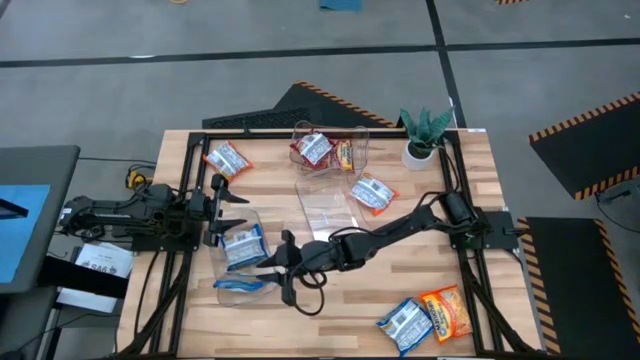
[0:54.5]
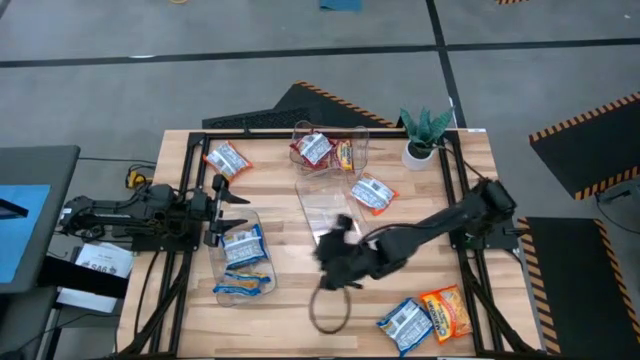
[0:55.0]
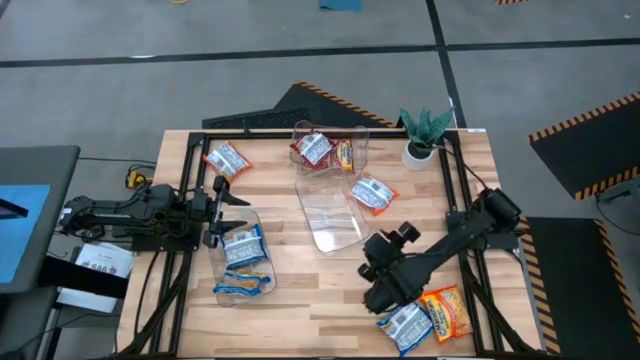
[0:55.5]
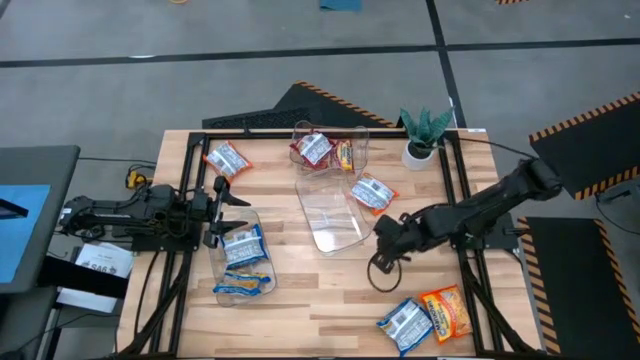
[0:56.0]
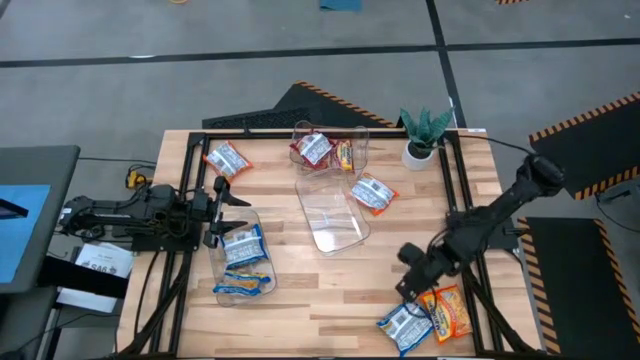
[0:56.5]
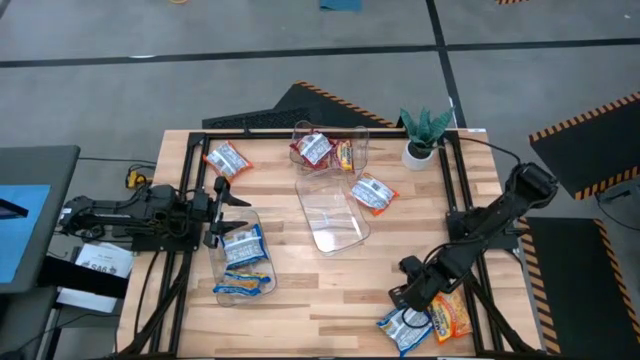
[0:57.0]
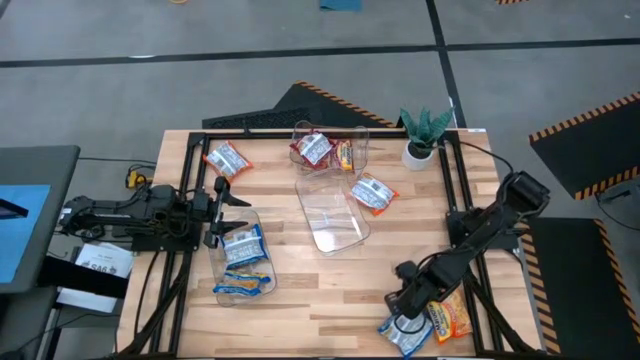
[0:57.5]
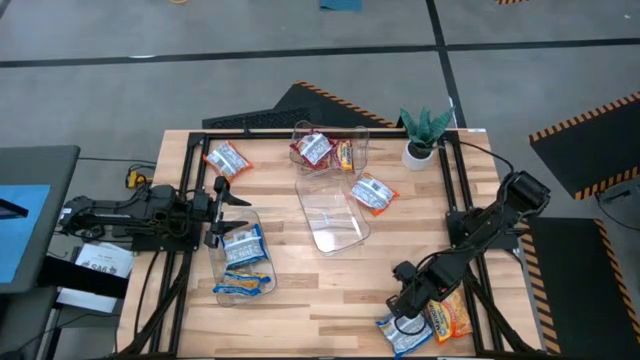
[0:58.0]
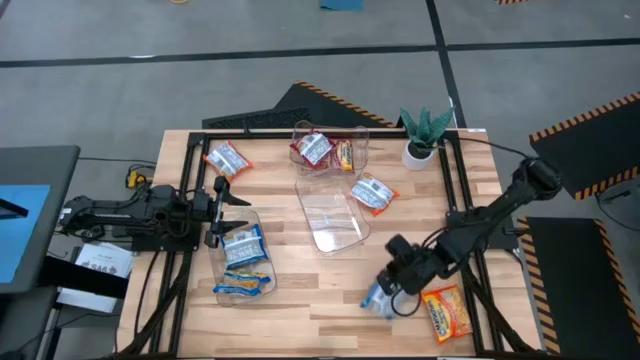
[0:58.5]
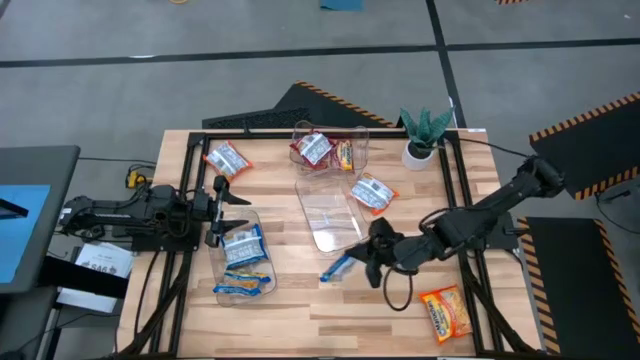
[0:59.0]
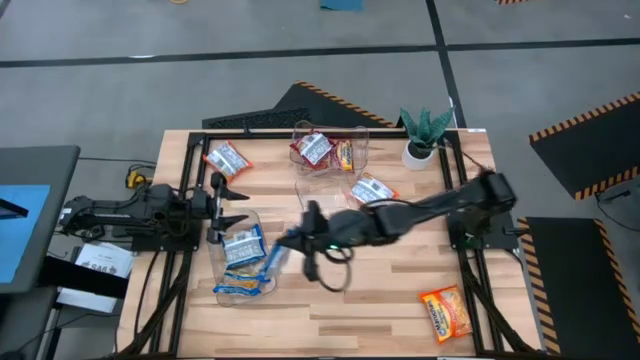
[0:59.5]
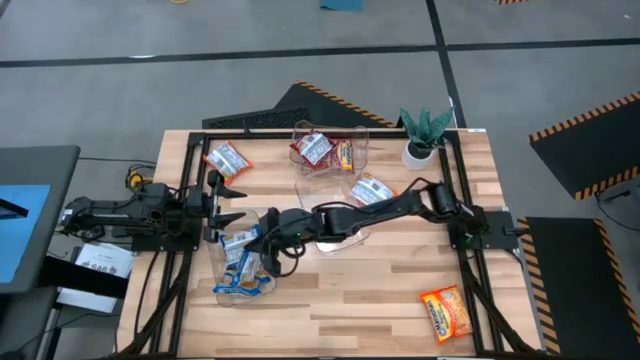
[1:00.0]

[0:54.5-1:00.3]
Task: Sort Maruchan noodles
Put the blue noodle pack into the bottom transparent bin

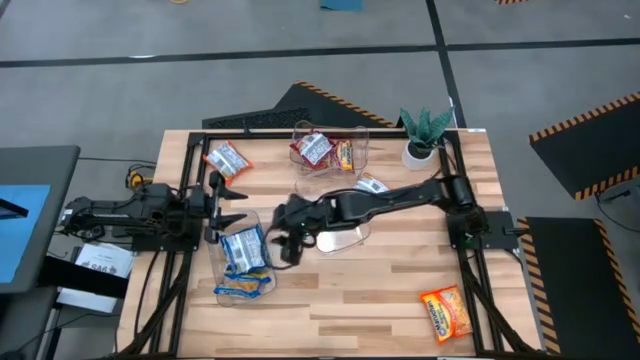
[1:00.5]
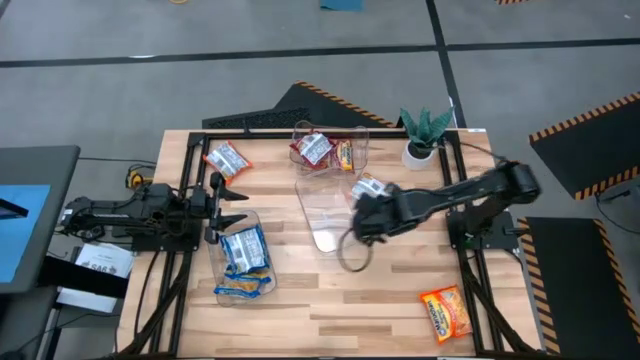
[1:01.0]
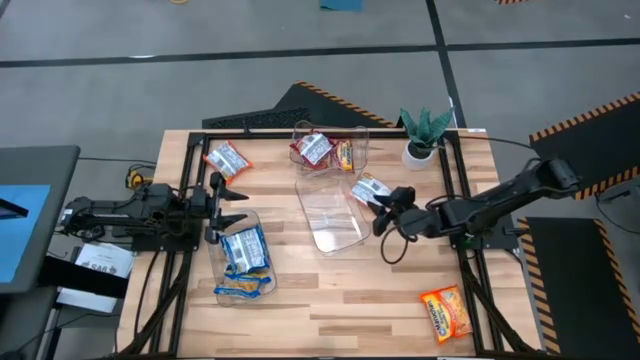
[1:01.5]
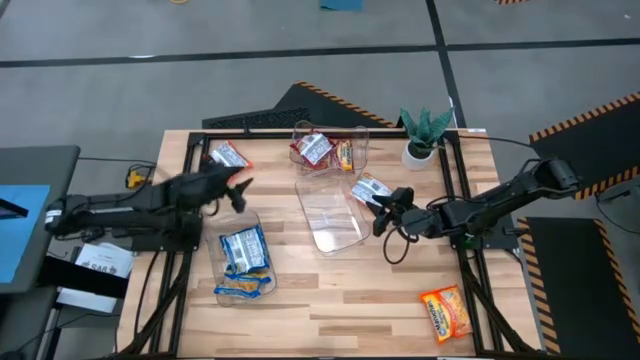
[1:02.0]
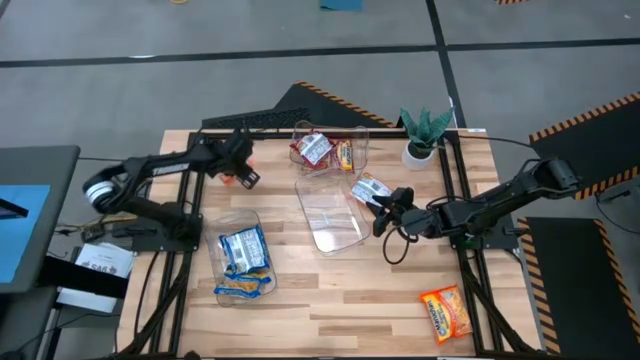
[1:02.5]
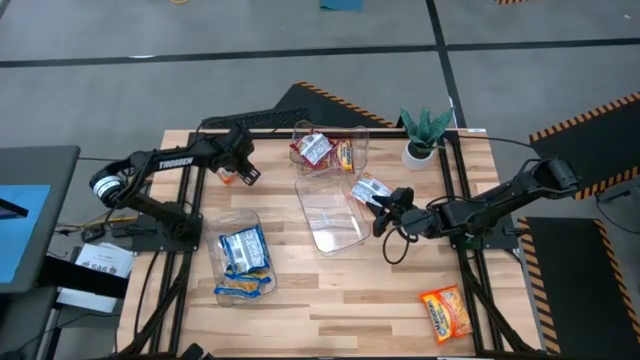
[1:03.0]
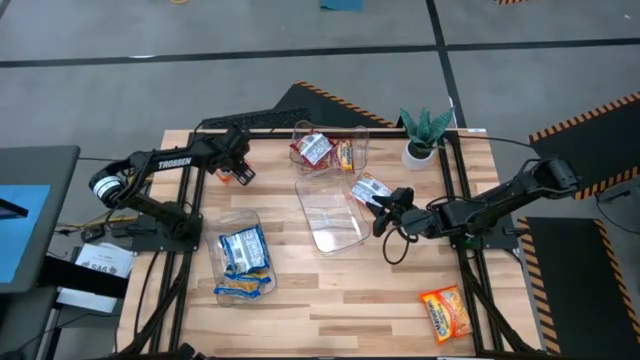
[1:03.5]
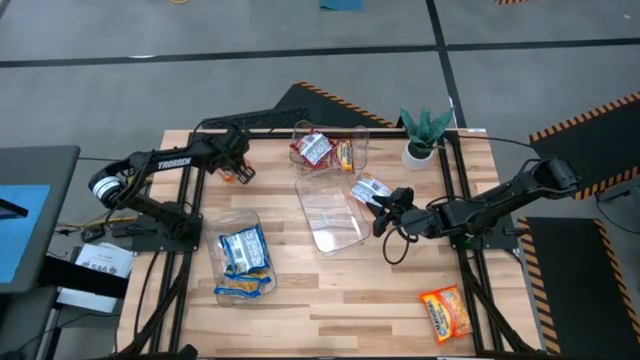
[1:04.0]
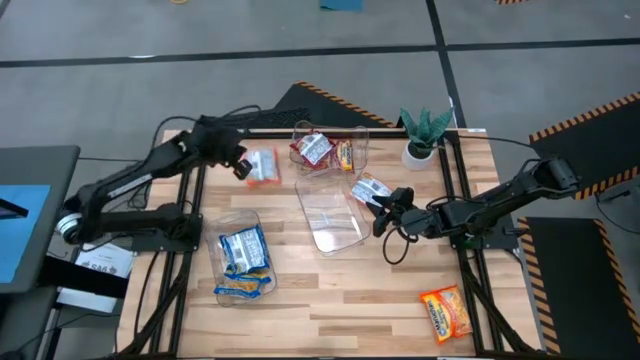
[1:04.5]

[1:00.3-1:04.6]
Put the top left orange noodle pack into the middle transparent bin

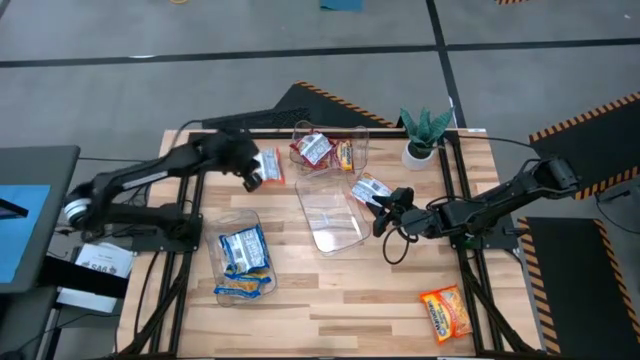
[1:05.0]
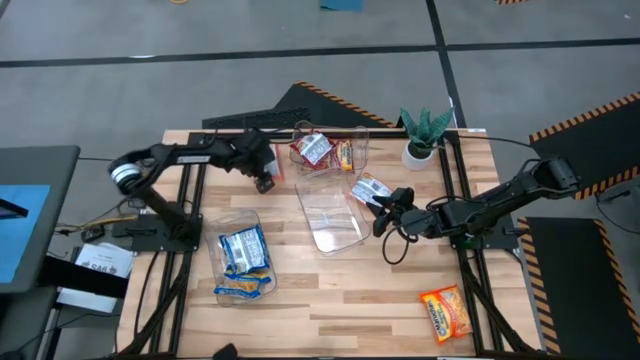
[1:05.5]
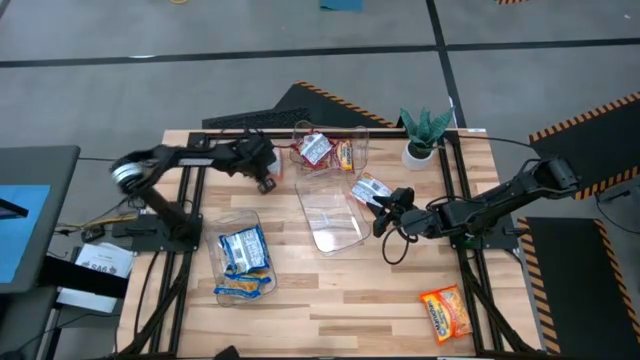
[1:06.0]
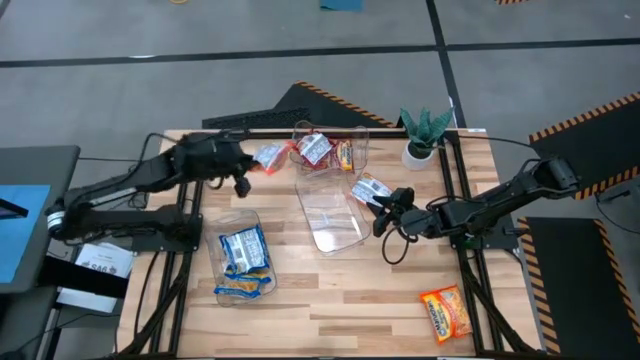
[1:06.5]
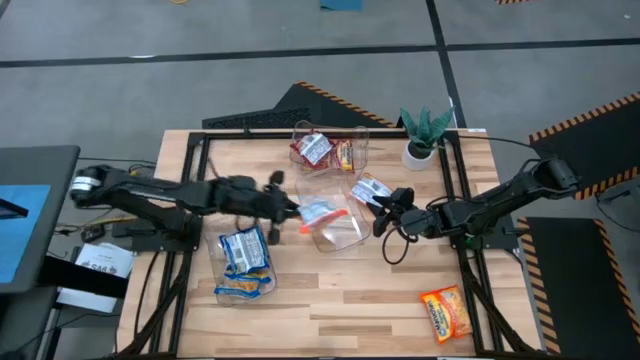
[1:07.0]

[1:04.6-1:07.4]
Put the top left orange noodle pack into the middle transparent bin

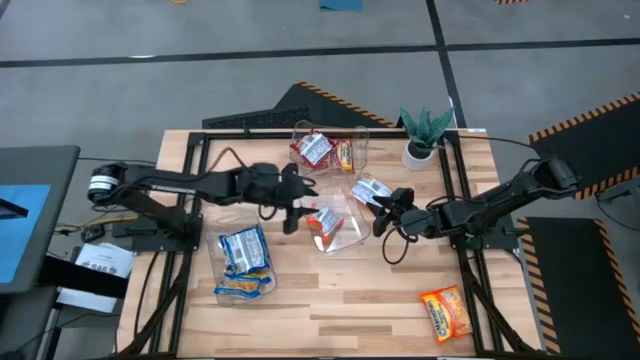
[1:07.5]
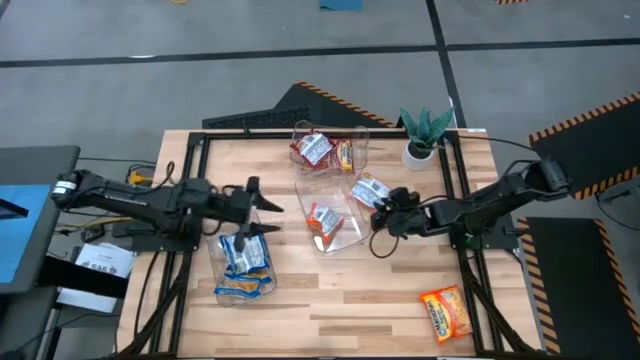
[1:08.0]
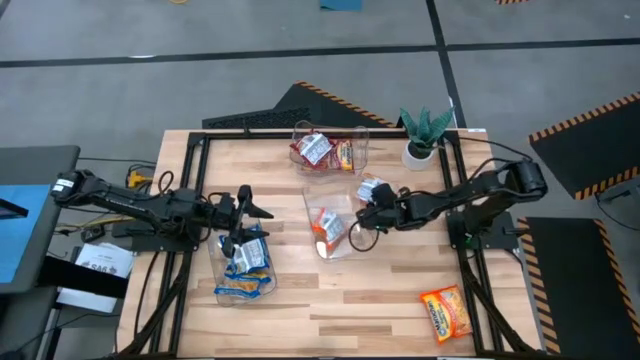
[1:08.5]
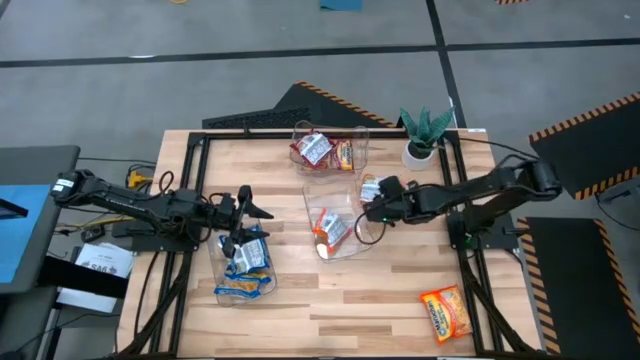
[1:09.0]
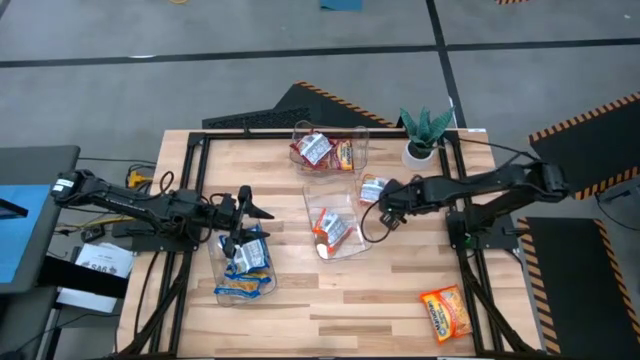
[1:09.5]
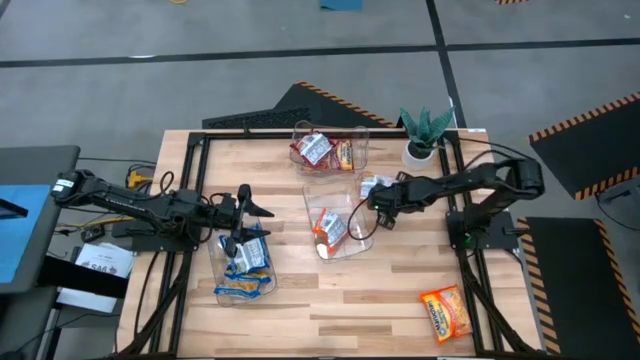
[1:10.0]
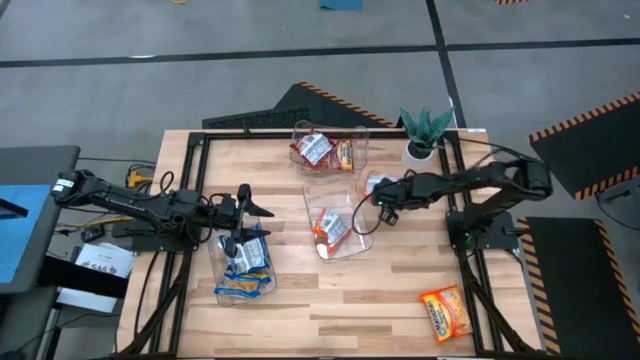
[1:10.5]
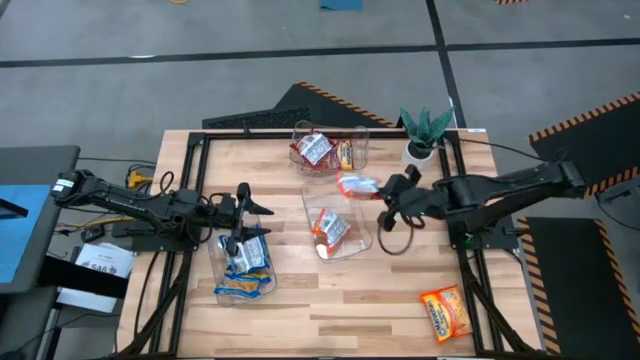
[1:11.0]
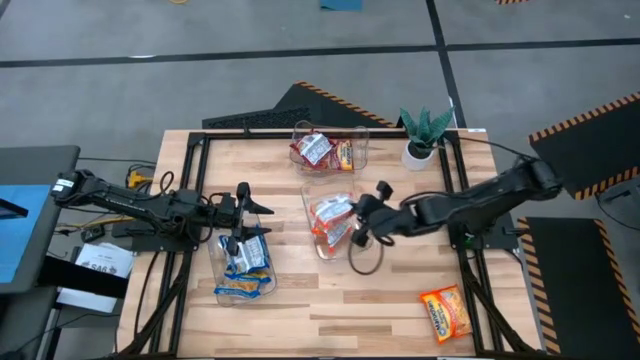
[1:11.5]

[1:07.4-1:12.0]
Put the top orange noodle pack into the middle transparent bin

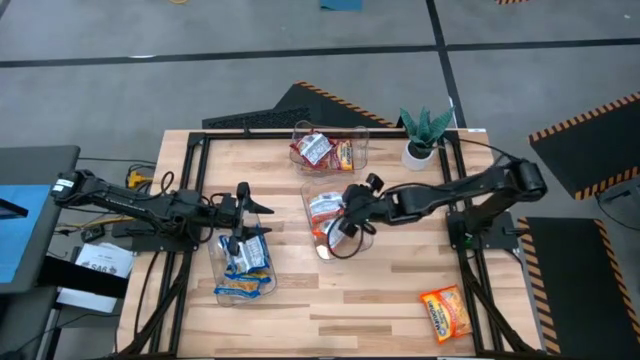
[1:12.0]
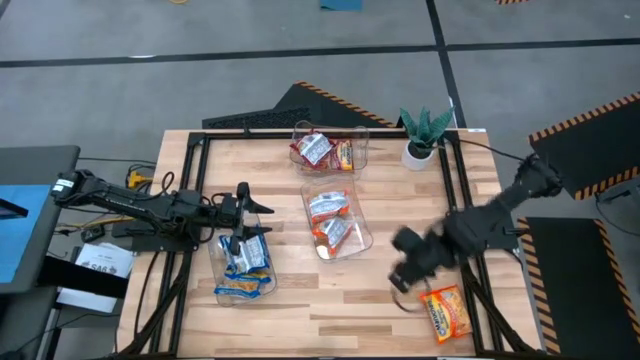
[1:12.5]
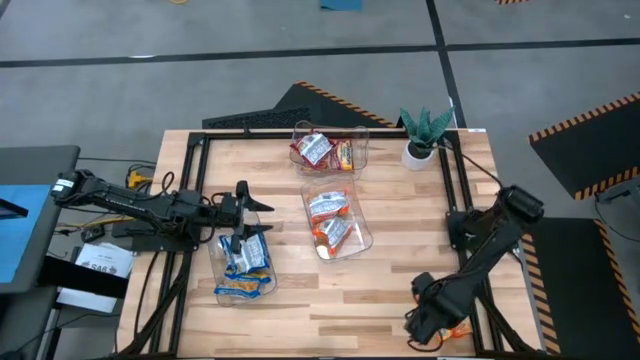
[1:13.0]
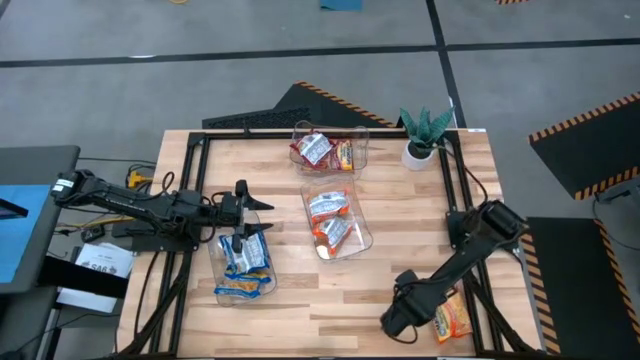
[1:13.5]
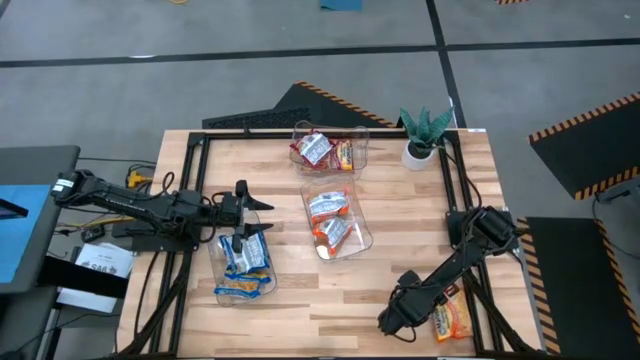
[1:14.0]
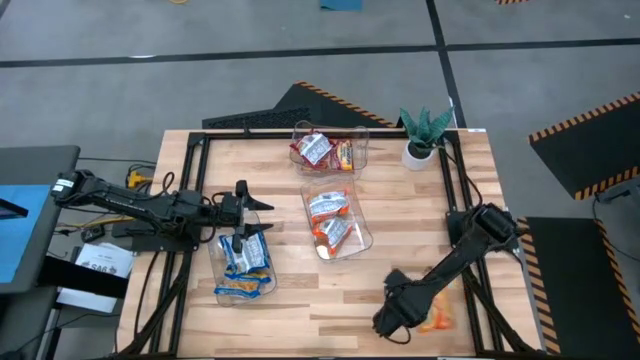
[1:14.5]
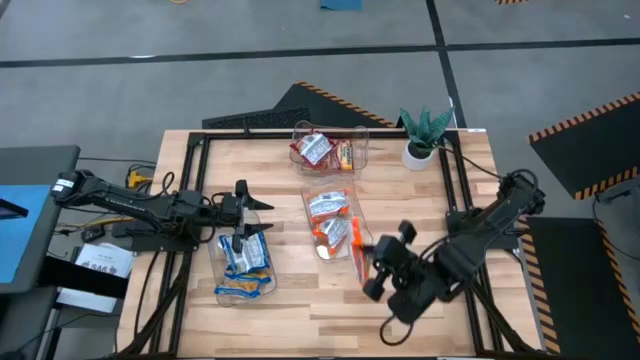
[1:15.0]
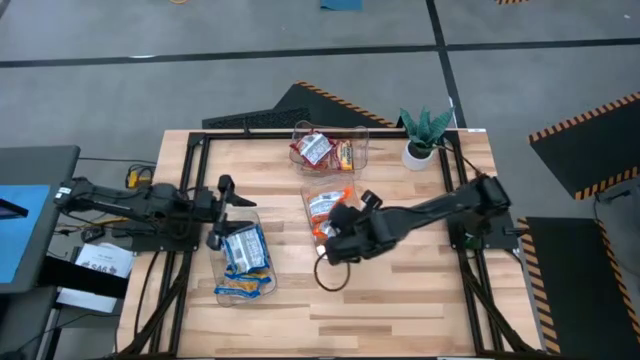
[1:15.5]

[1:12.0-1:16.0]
Put the orange noodle pack into the middle transparent bin
